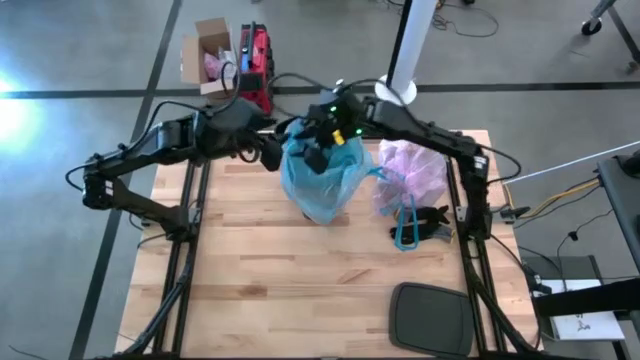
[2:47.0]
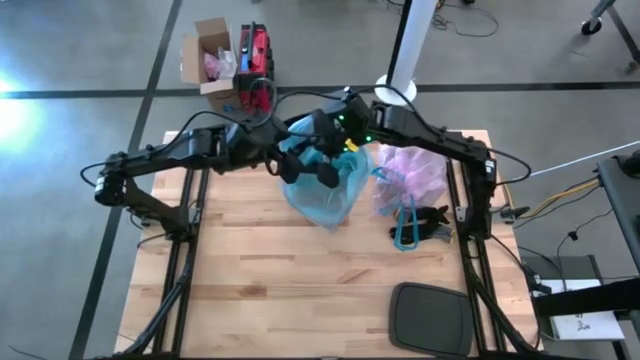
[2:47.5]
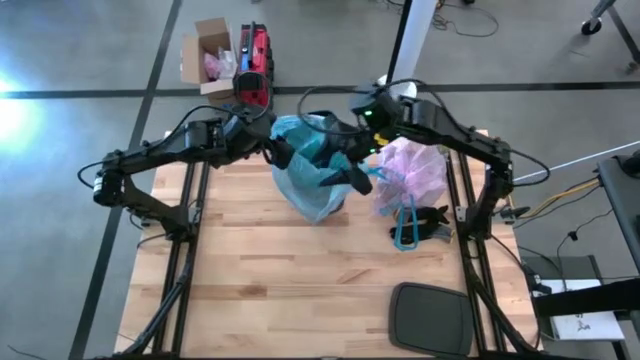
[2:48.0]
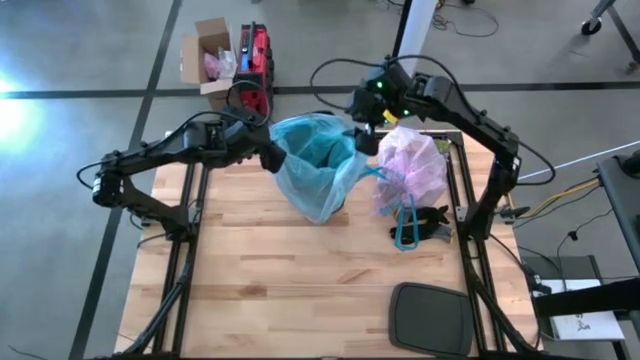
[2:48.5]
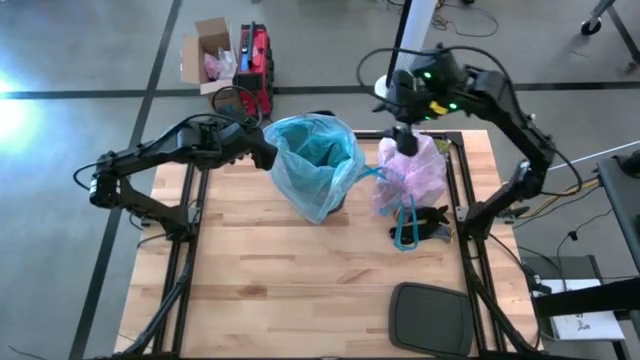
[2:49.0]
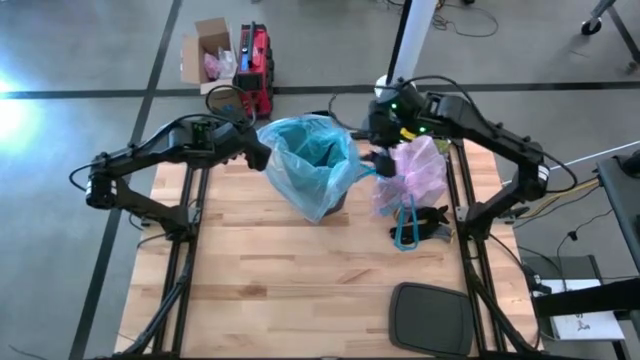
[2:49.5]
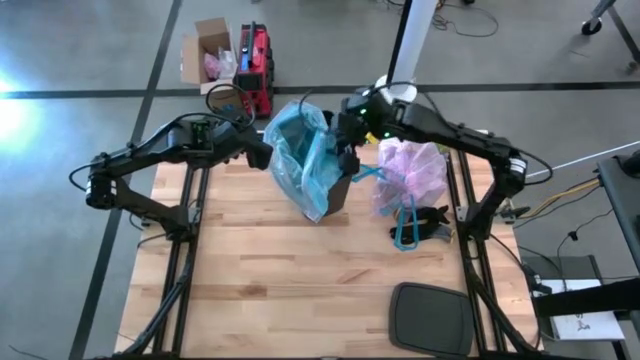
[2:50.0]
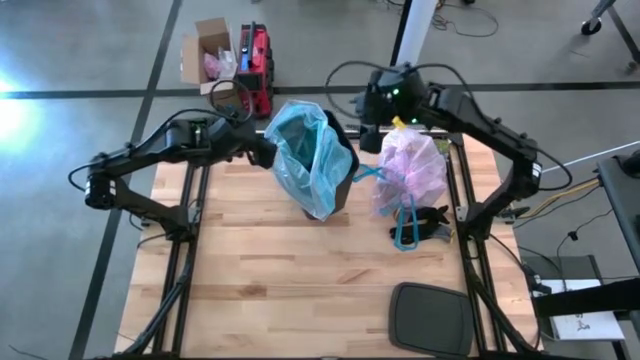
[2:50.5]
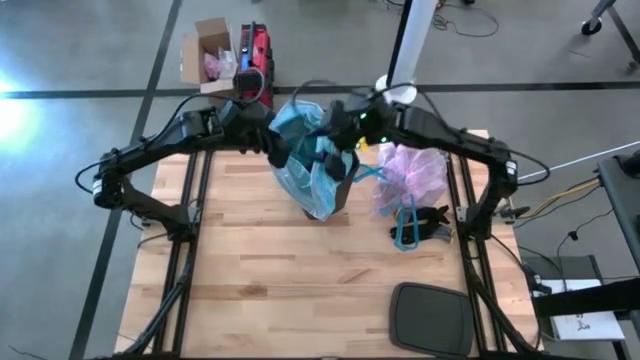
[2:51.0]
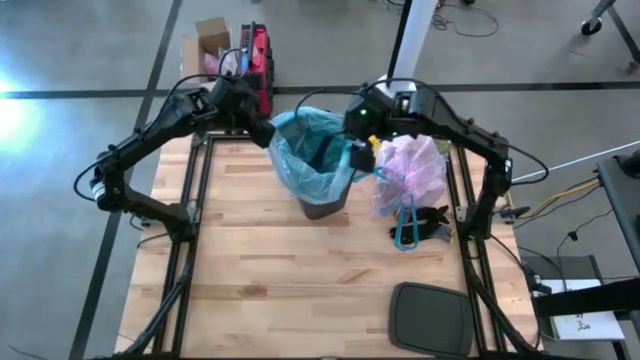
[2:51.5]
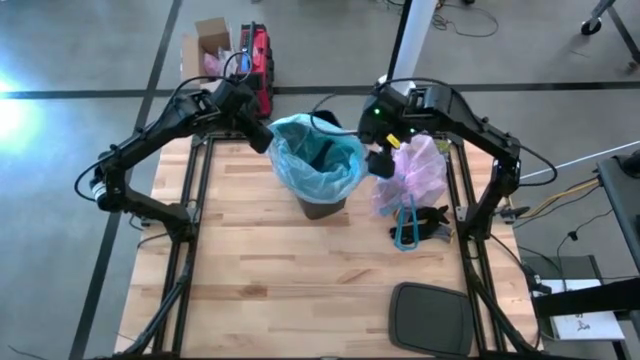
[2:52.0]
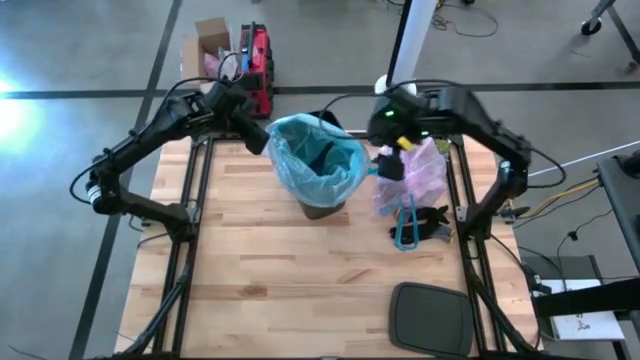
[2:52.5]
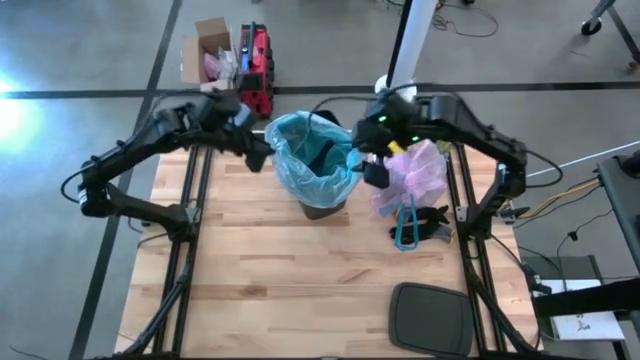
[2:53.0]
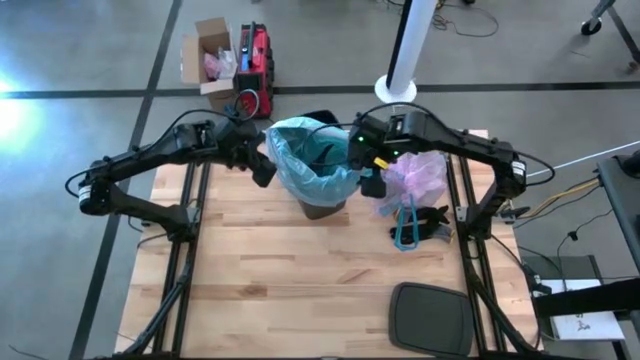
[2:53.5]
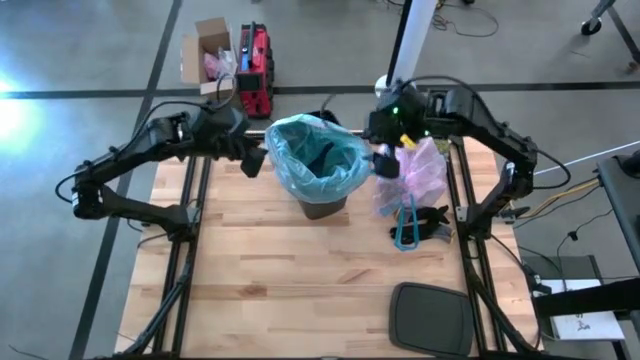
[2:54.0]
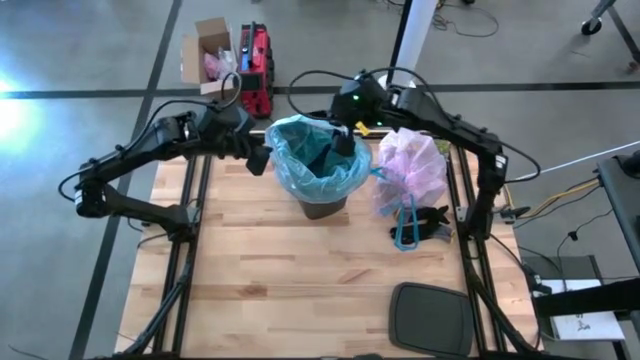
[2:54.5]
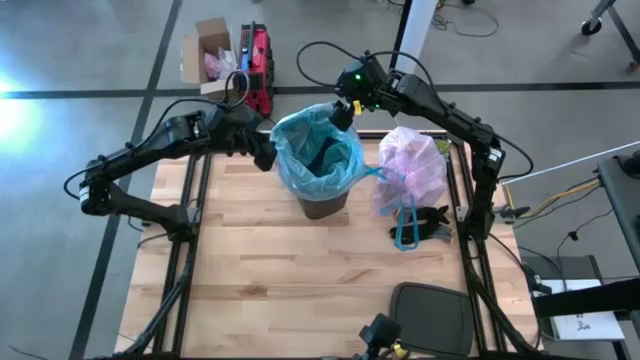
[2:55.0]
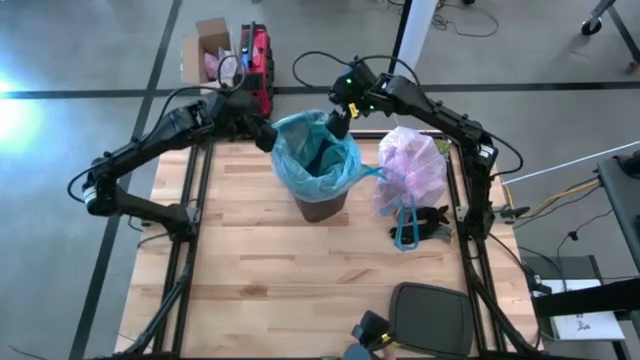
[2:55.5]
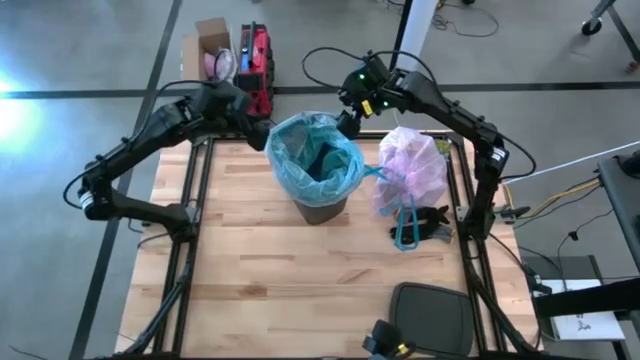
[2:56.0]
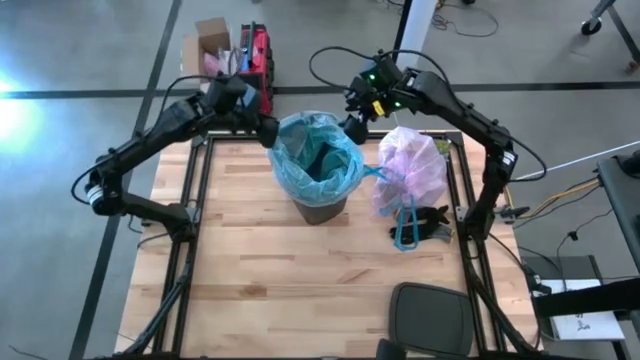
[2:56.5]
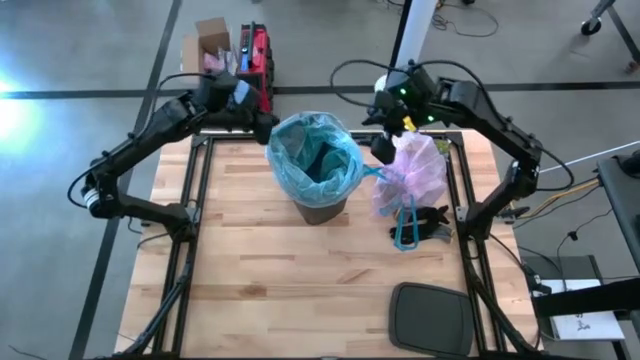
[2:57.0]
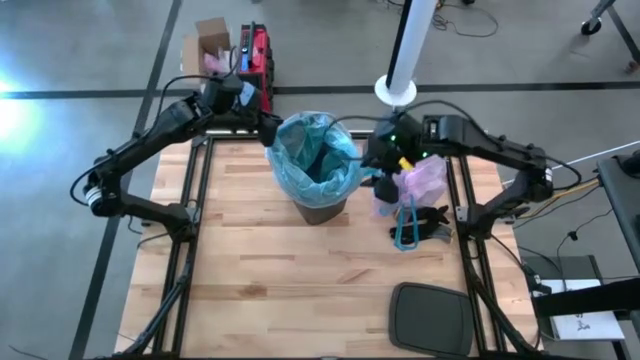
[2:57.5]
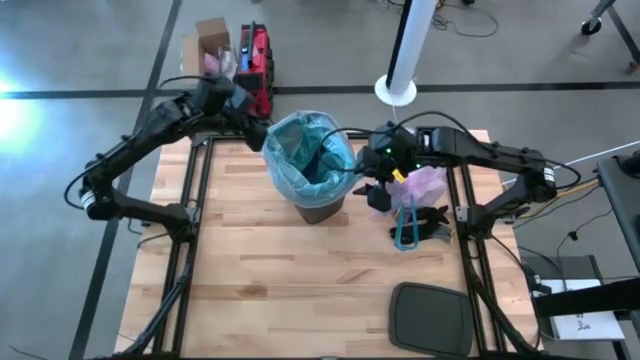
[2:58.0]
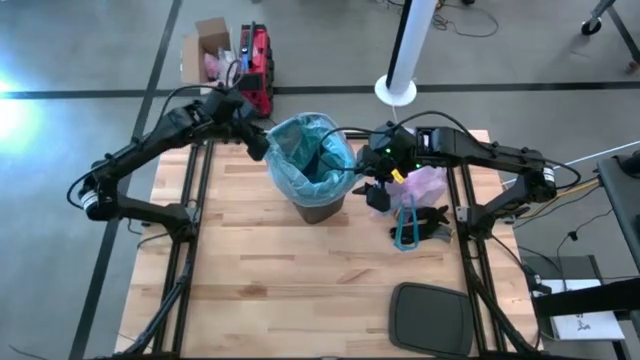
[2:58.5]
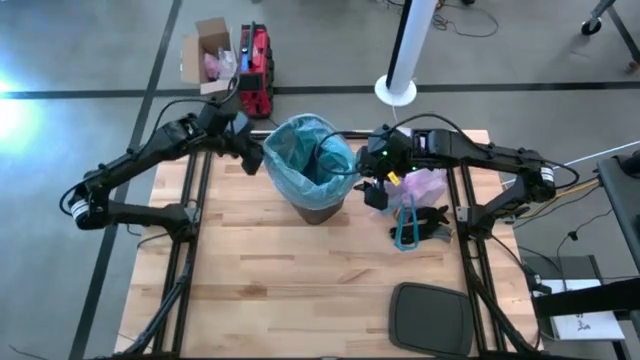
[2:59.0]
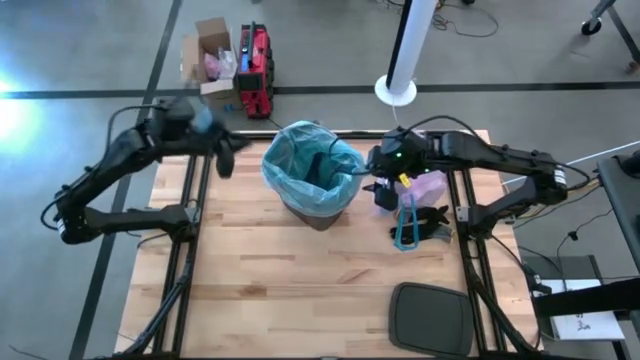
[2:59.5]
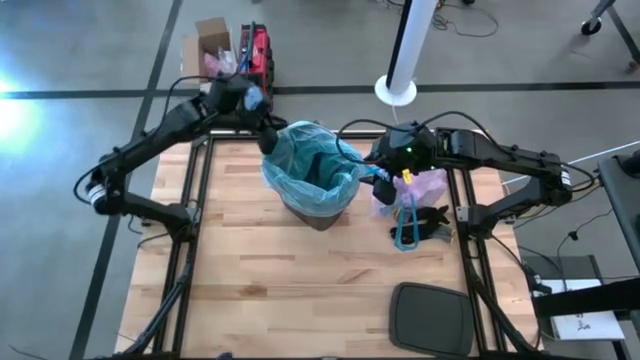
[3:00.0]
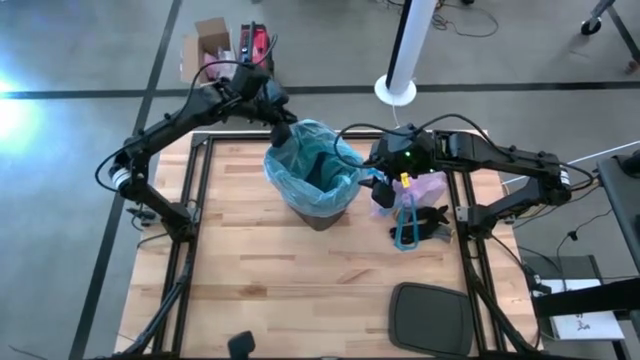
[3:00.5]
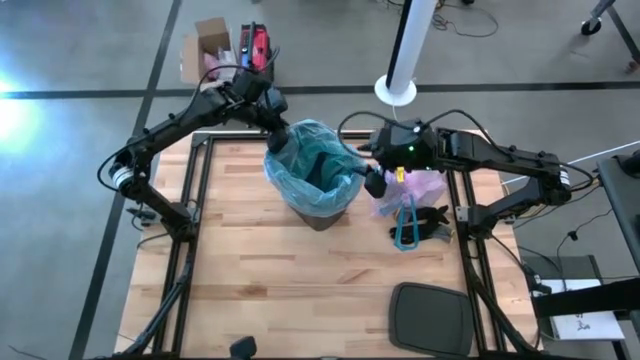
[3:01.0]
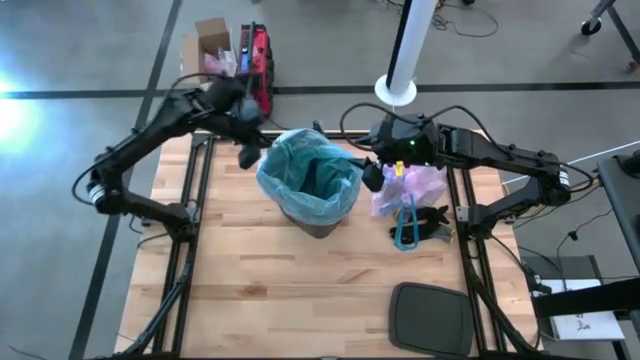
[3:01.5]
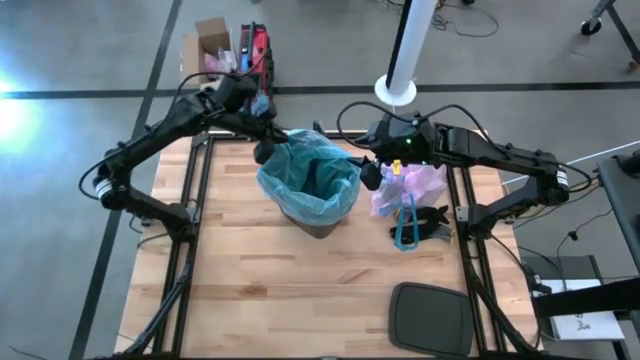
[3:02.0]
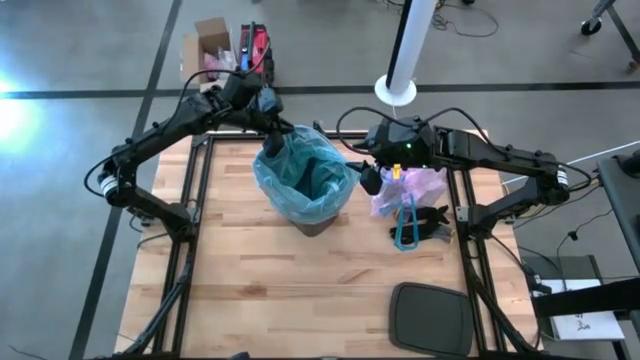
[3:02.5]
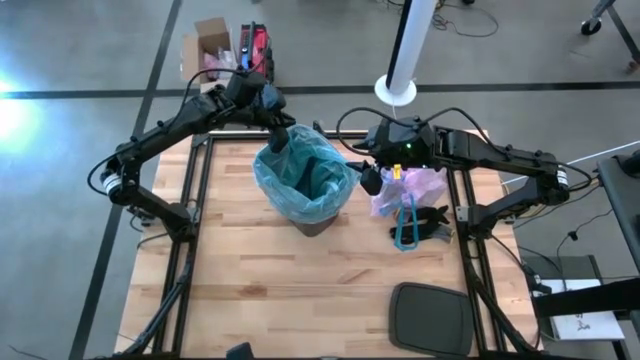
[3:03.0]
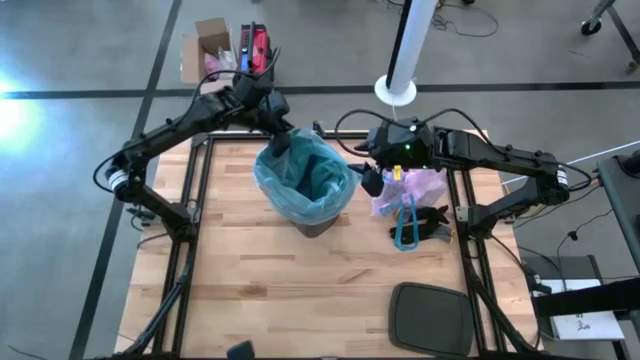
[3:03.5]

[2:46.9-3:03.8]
Task: place trash/remove bag and relplace
Insert the new blue trash bag into the trash bin

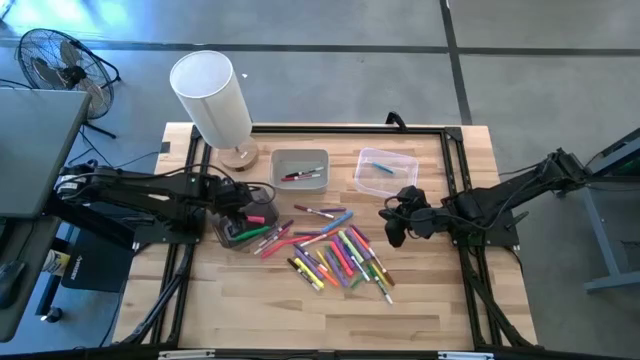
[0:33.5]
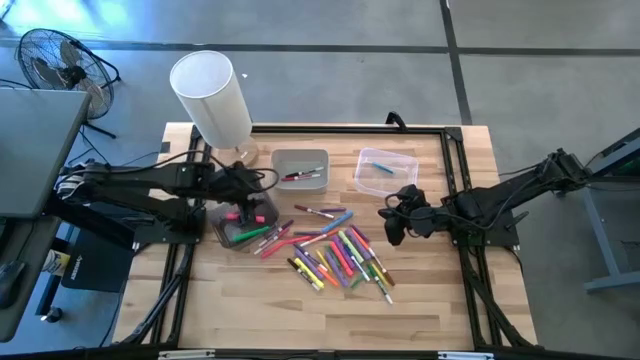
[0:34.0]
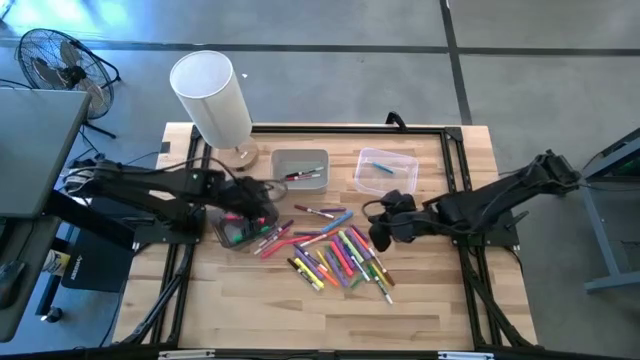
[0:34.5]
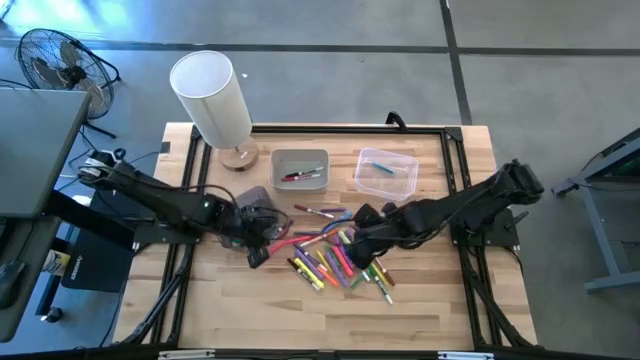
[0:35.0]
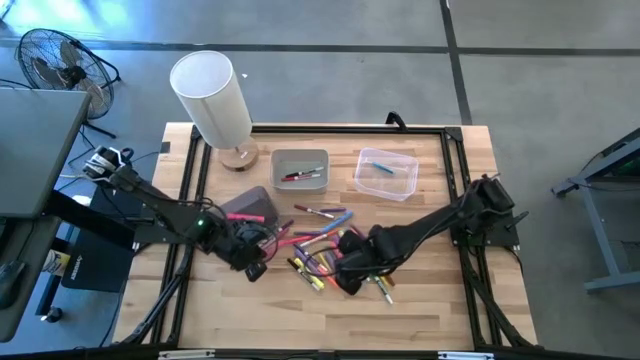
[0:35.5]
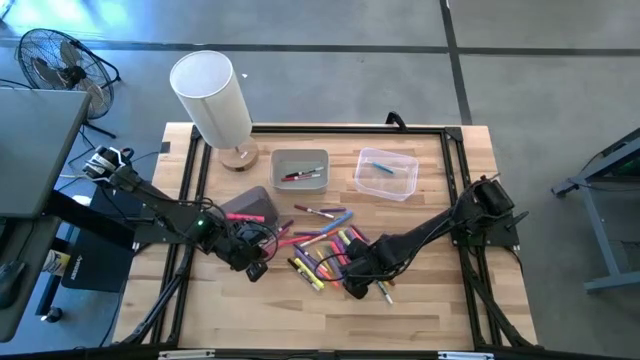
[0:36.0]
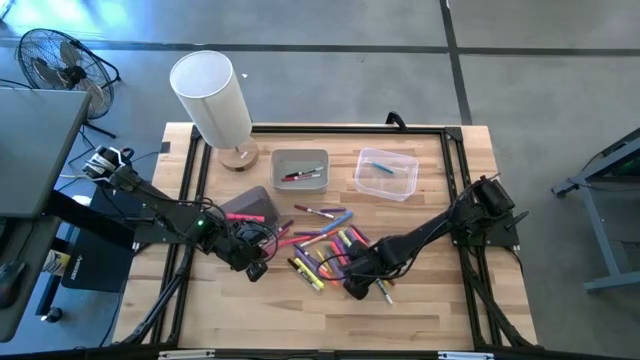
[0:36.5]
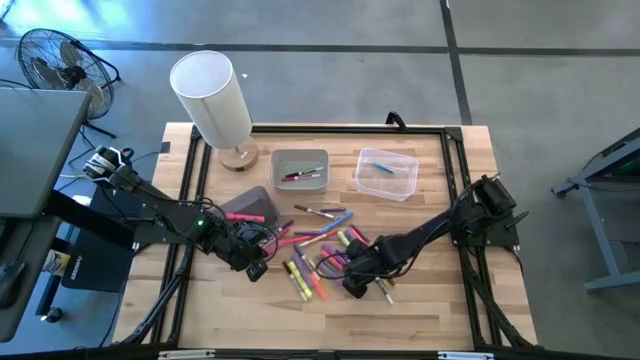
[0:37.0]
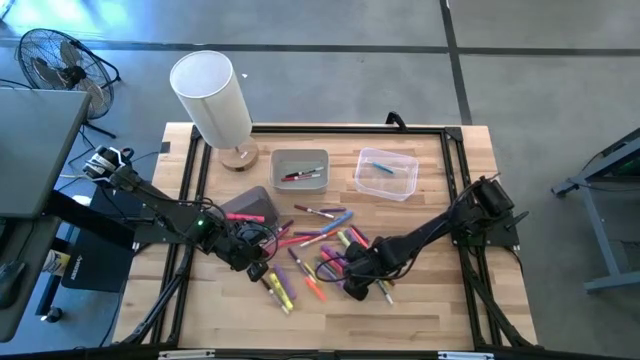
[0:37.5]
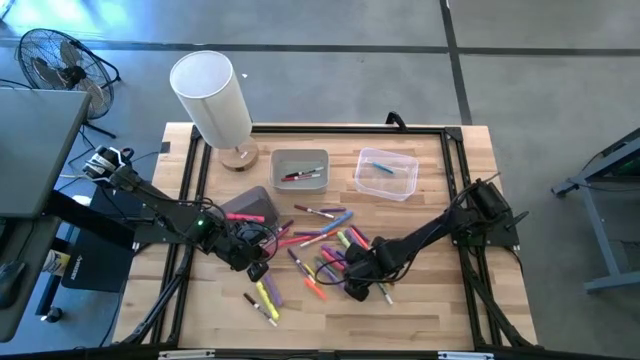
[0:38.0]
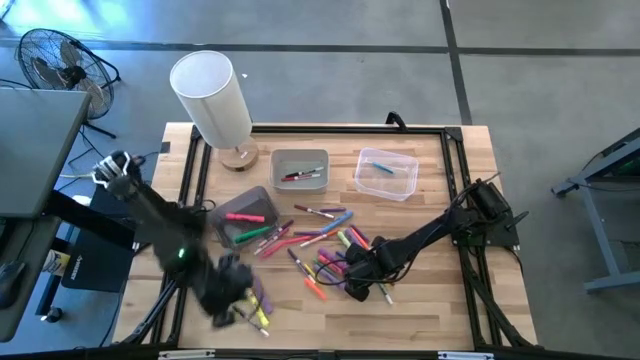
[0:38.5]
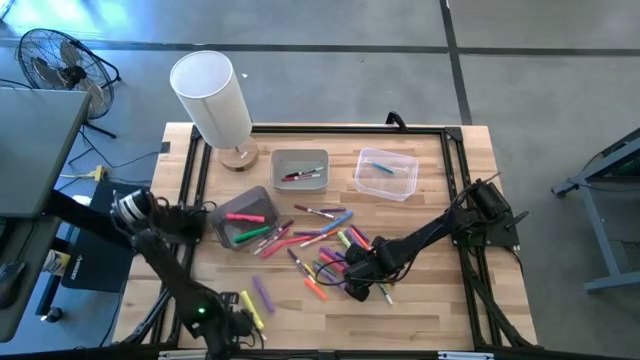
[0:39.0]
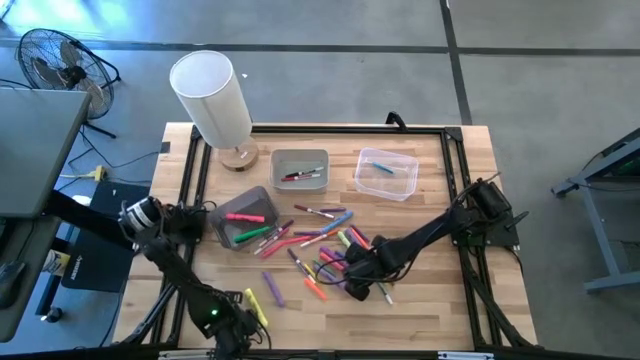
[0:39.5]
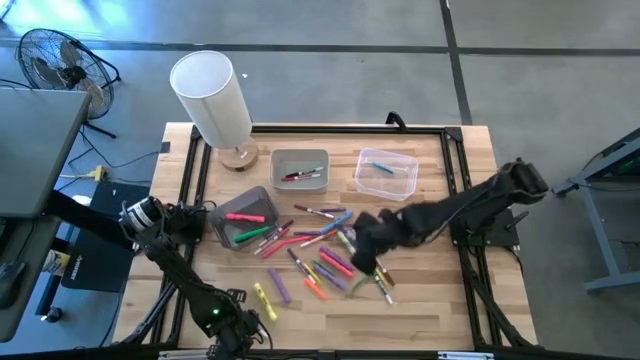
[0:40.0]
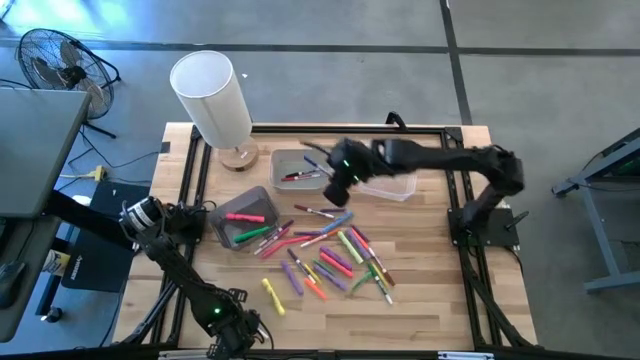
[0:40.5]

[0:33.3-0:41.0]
Task: Pick & Place Markers
Put the blue marker pen into the white bin
